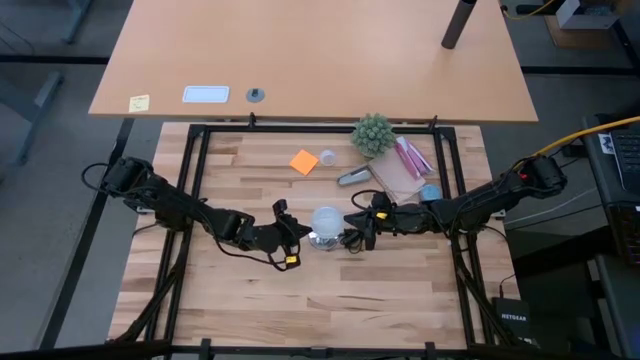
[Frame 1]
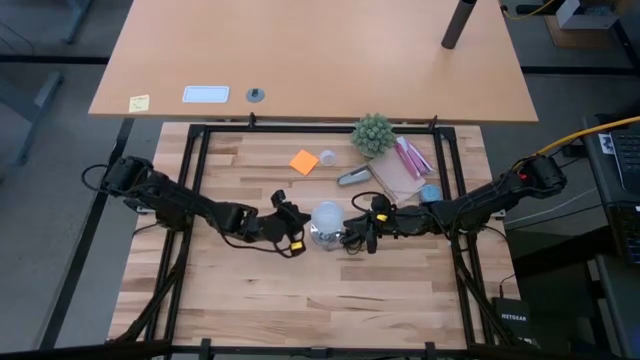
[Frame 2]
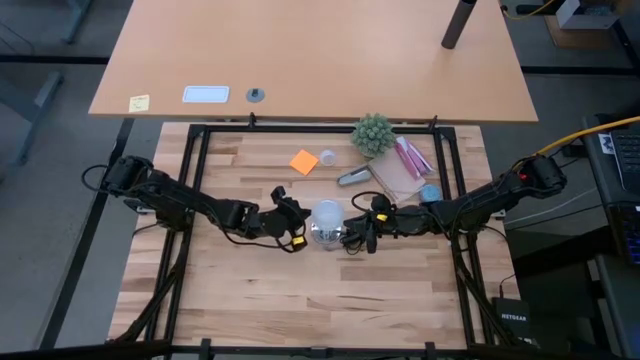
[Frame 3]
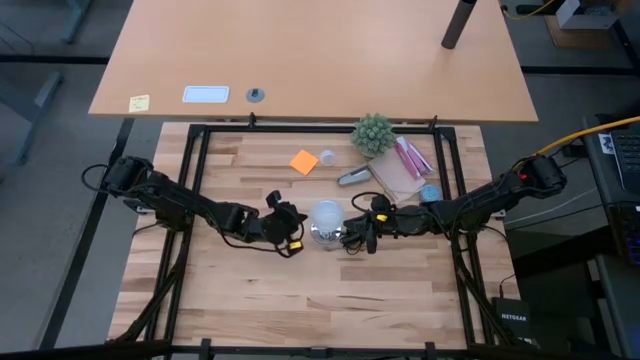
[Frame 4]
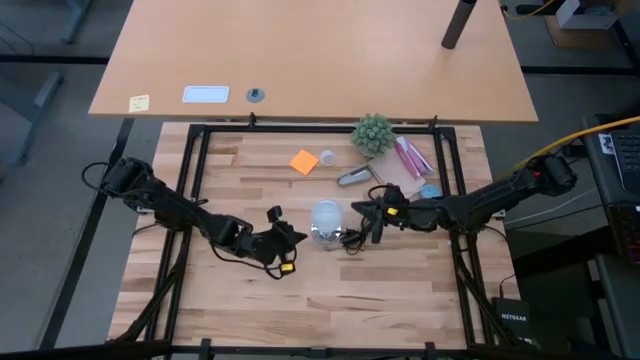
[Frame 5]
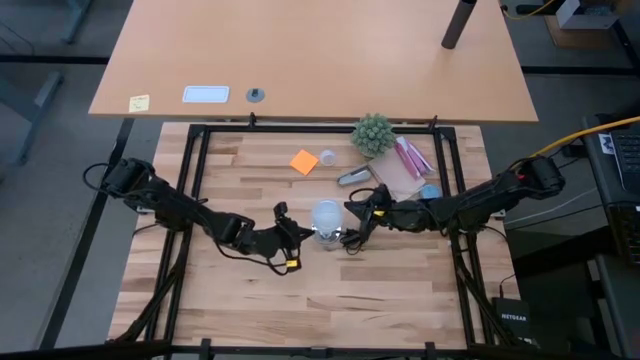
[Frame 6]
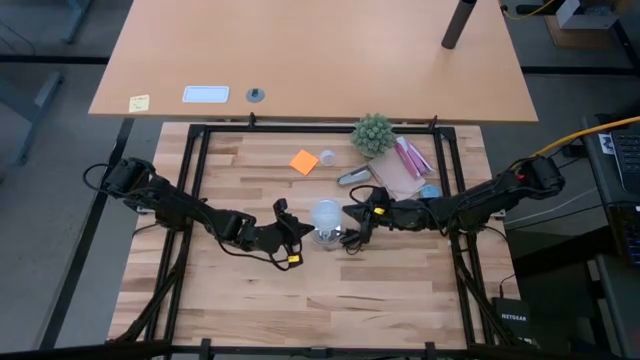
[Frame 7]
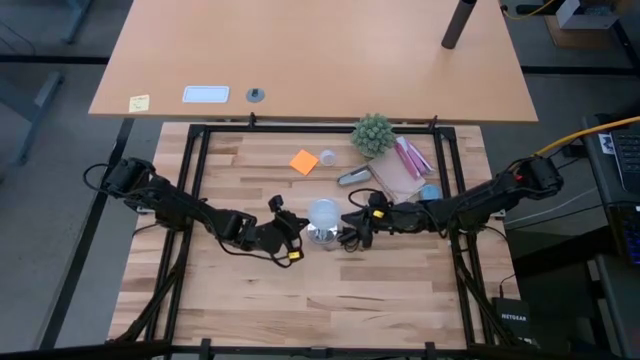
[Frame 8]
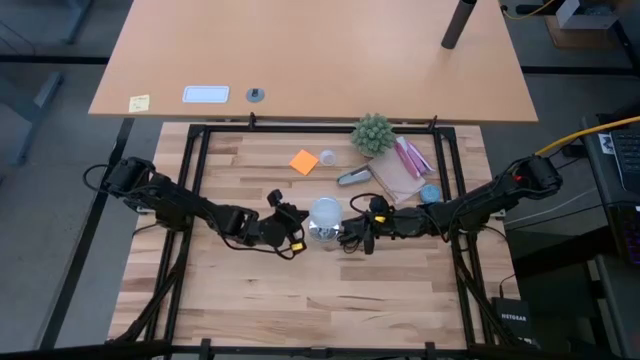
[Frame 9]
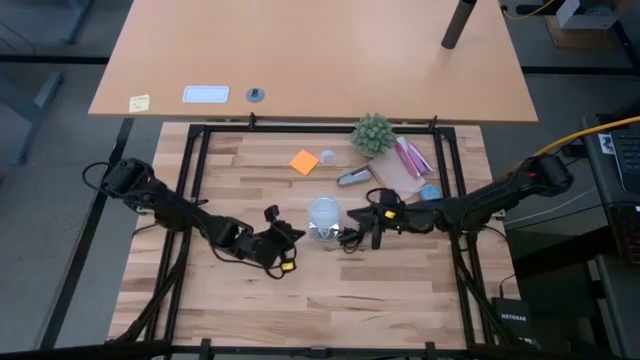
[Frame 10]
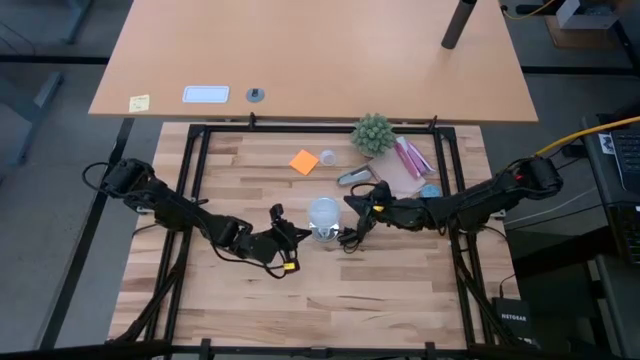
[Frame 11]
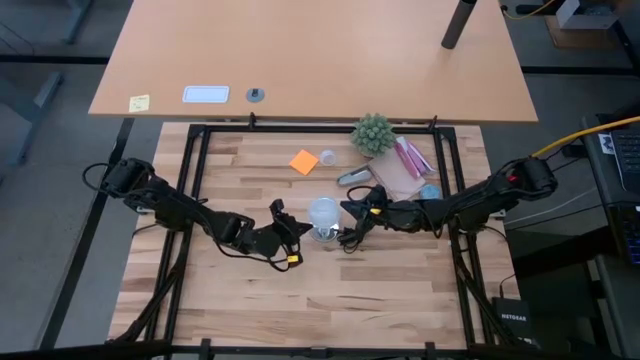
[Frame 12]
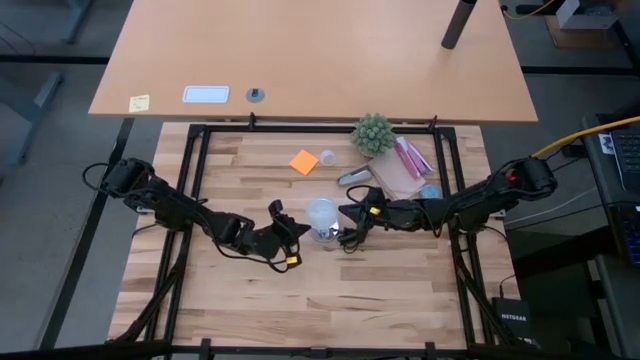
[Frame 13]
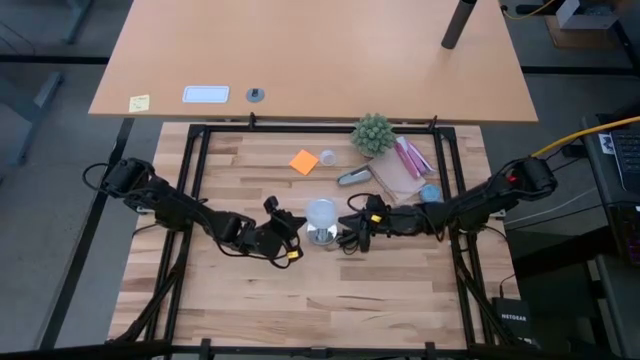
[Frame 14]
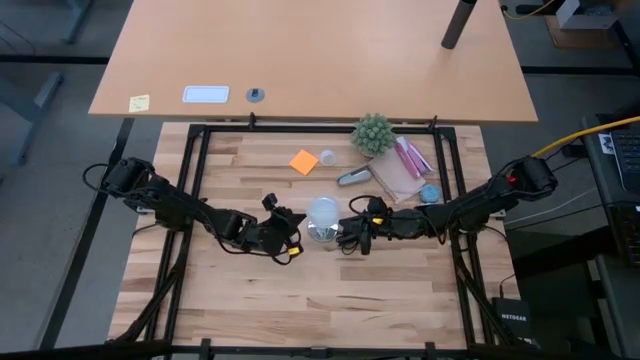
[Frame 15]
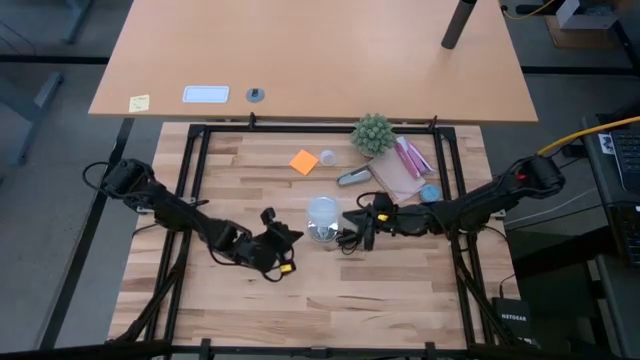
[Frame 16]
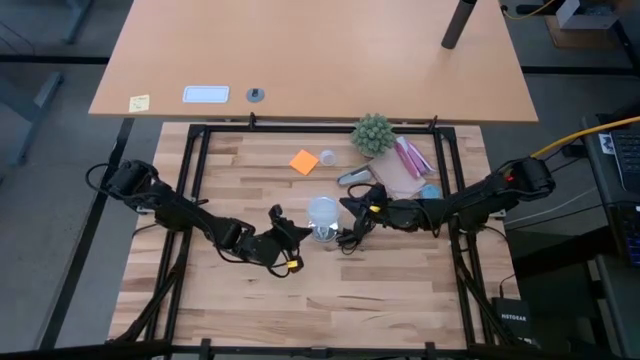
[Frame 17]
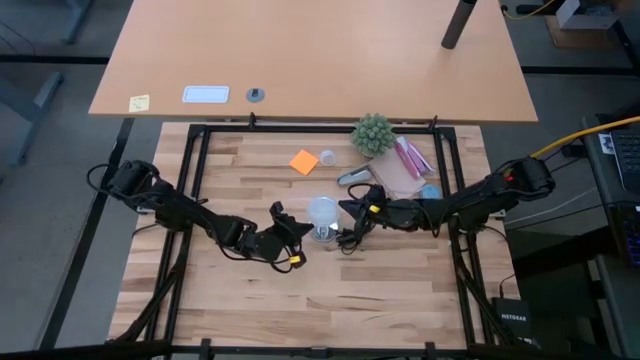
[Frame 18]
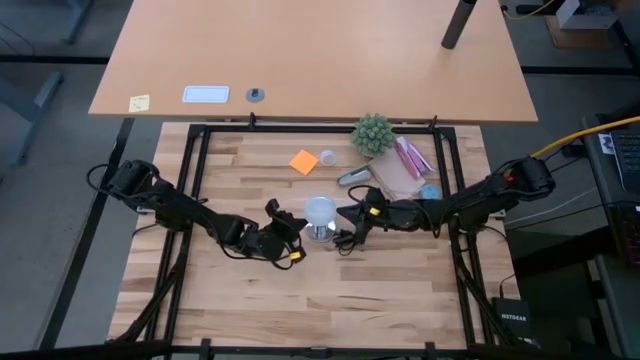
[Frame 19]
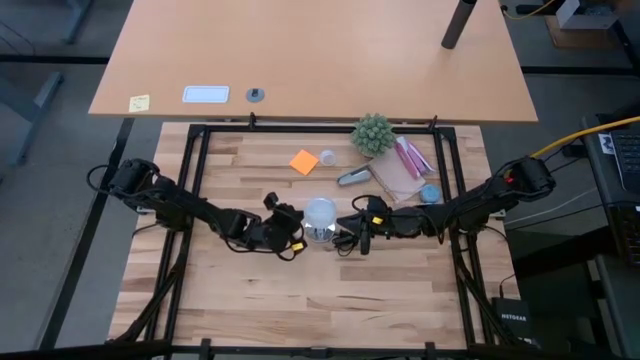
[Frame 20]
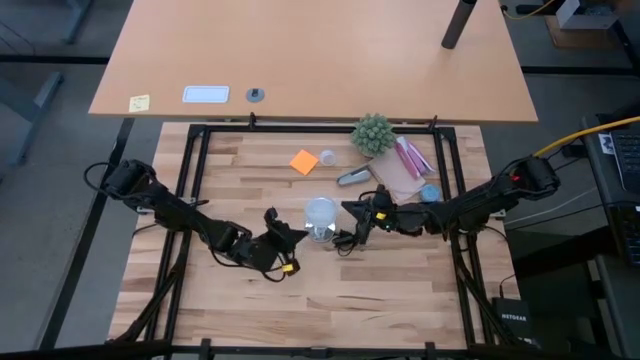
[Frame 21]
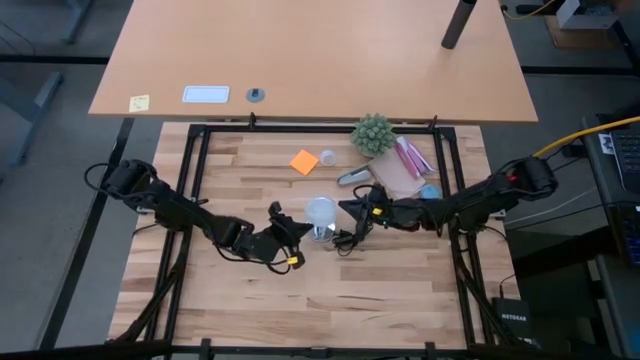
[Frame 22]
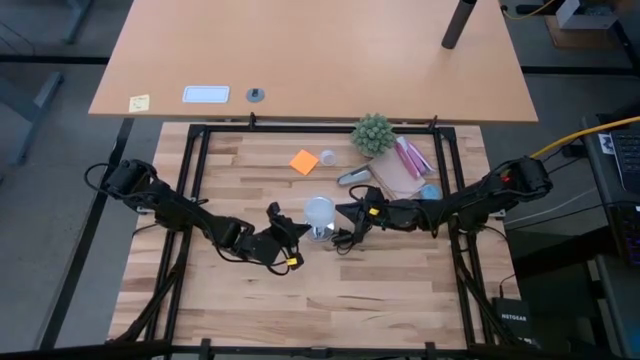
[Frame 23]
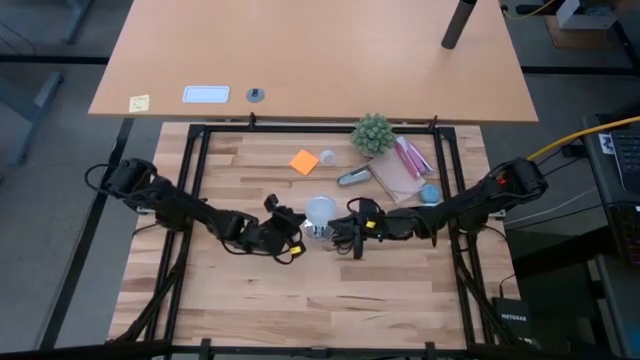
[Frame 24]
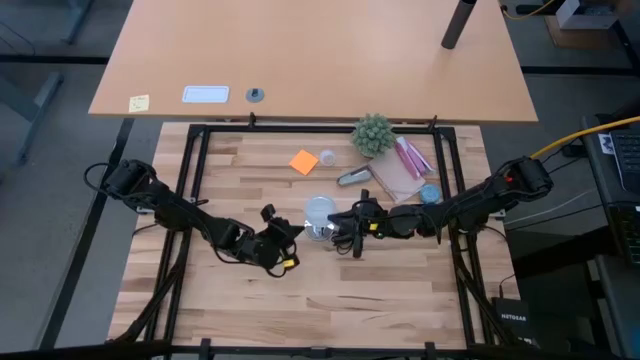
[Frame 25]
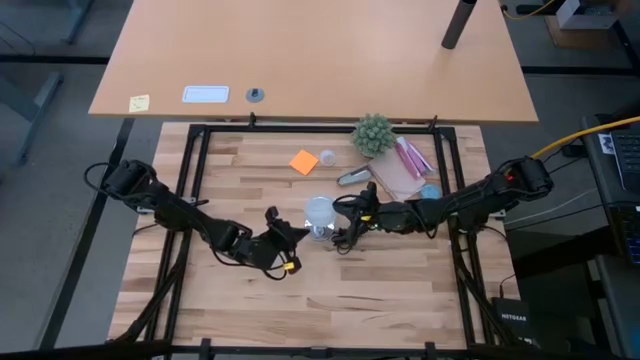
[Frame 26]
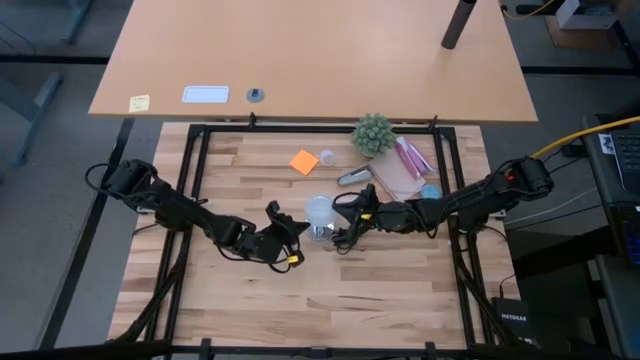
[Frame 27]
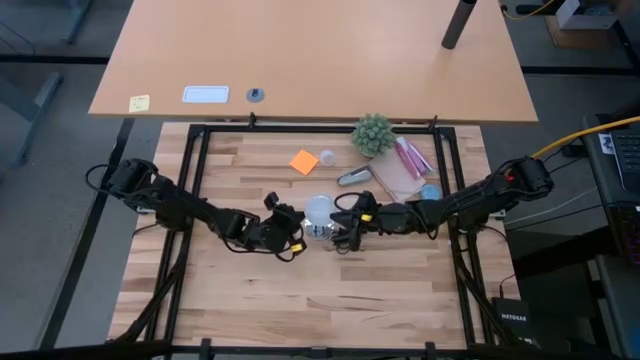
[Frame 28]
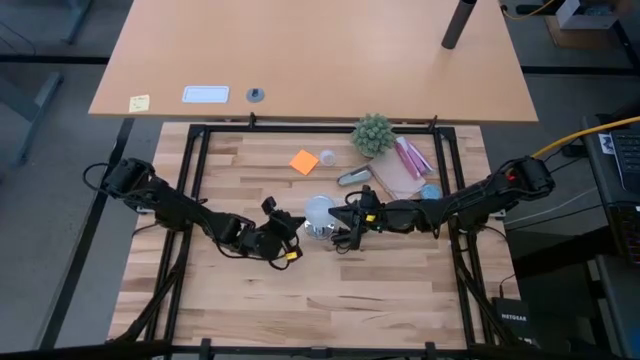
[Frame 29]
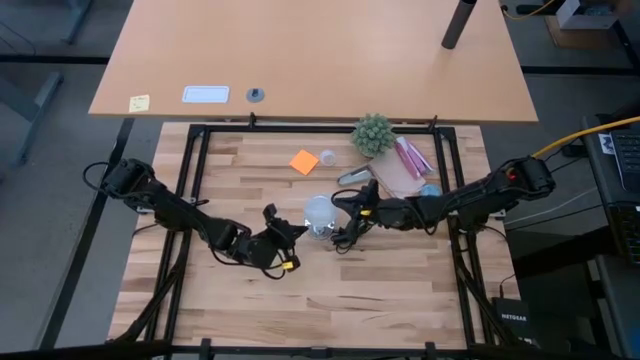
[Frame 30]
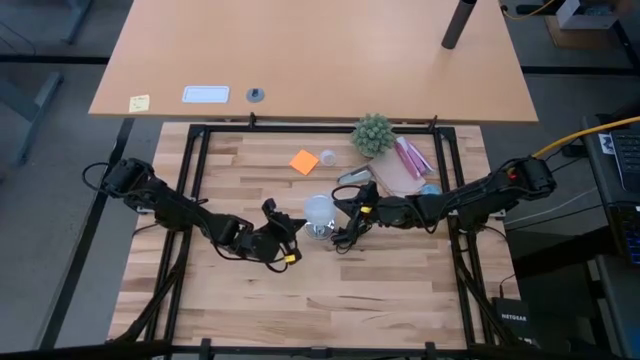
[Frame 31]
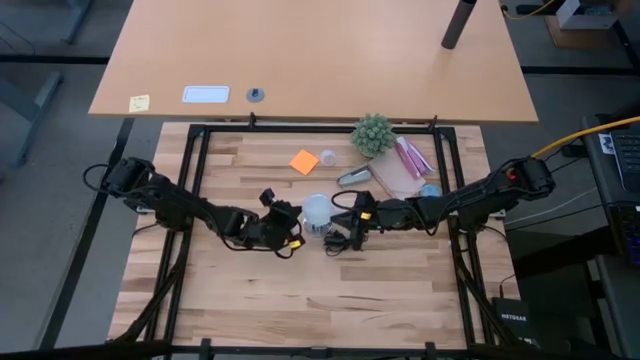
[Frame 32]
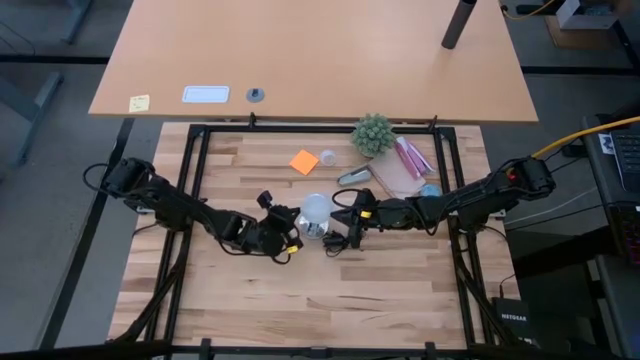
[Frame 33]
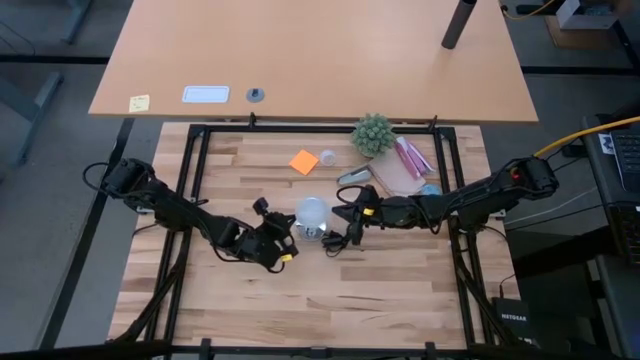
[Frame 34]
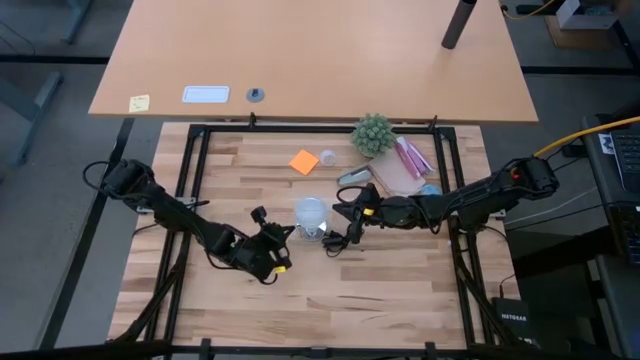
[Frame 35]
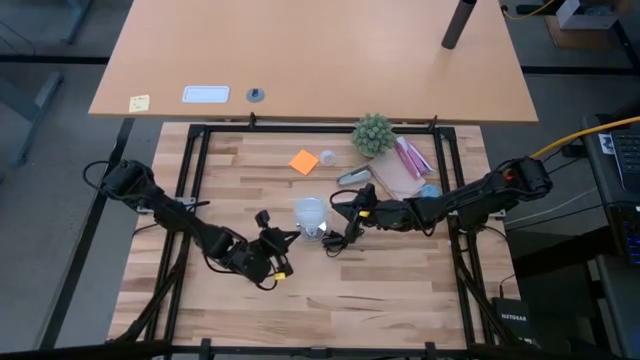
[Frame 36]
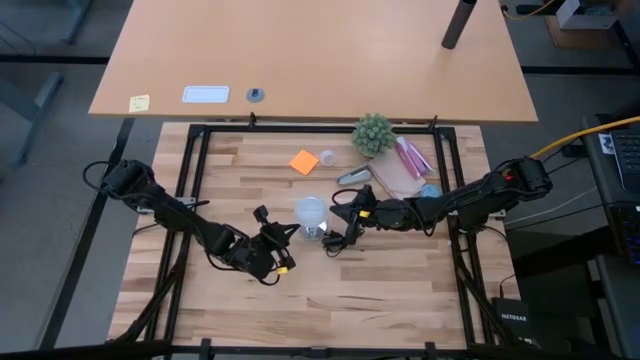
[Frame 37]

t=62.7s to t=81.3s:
Task: Screw lightbulb
Insert the lightbulb in the silver lamp
